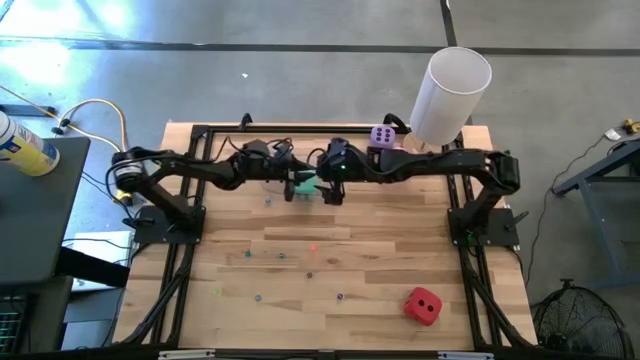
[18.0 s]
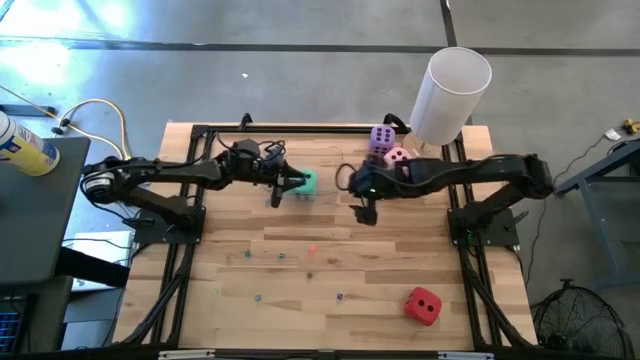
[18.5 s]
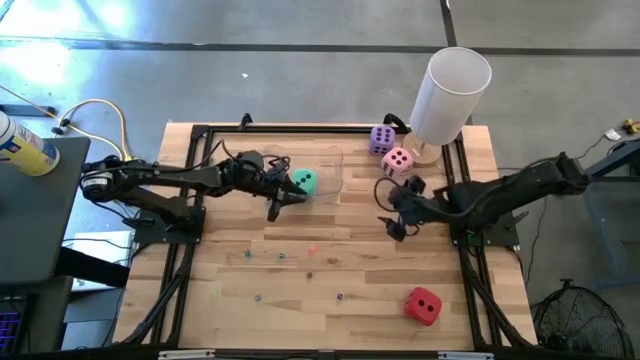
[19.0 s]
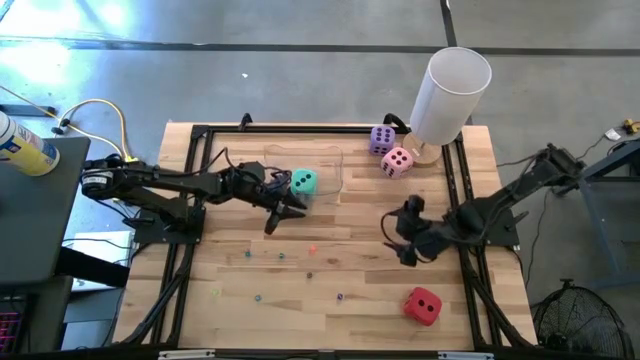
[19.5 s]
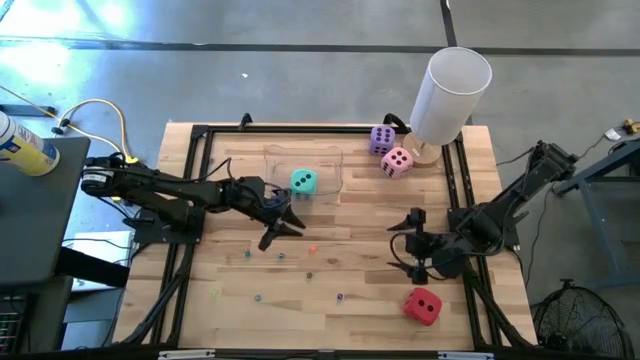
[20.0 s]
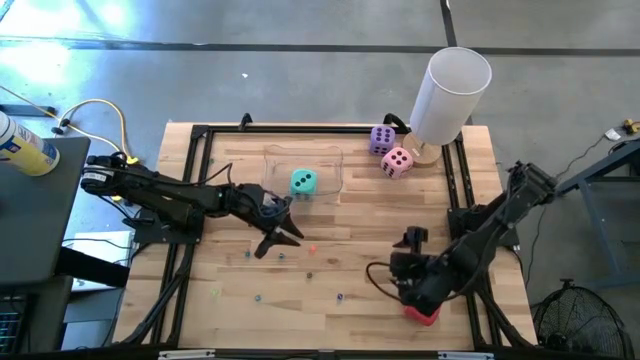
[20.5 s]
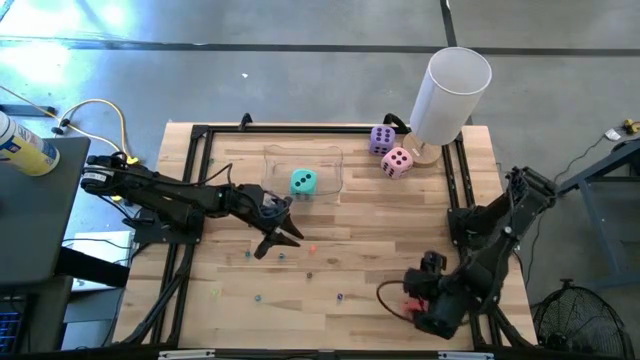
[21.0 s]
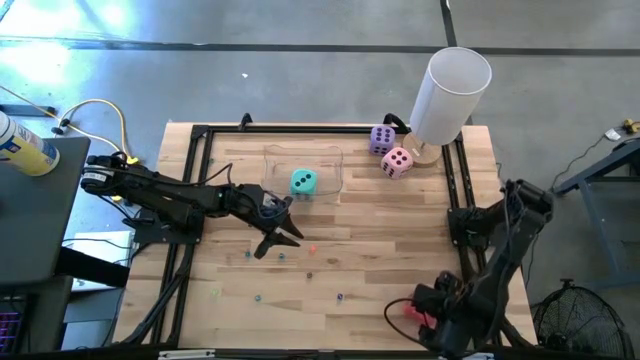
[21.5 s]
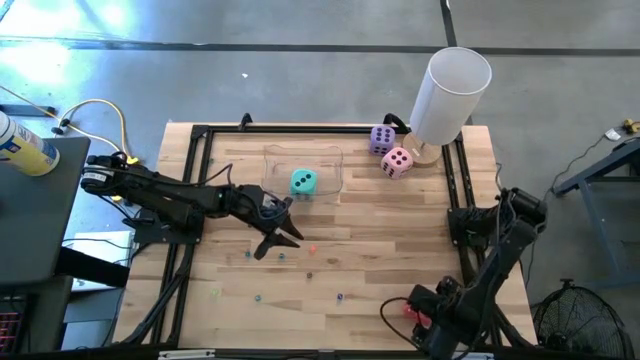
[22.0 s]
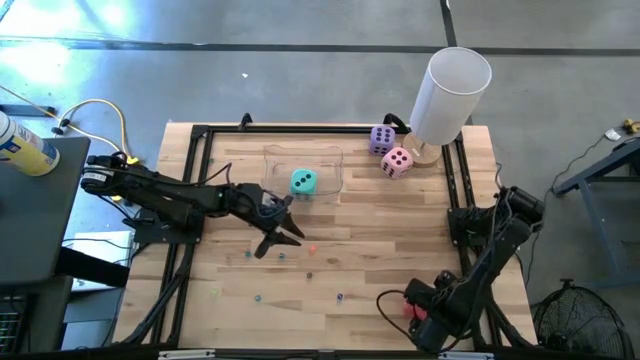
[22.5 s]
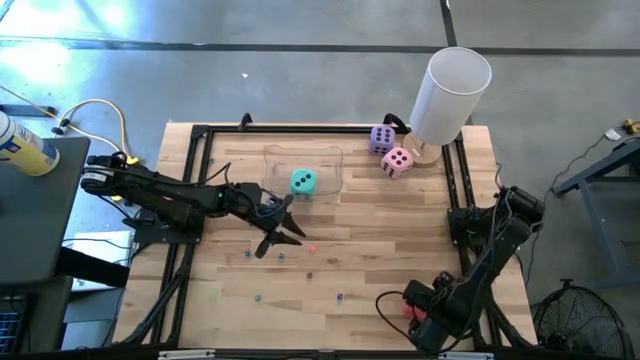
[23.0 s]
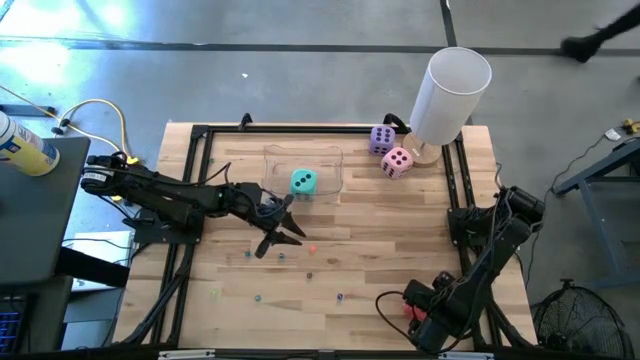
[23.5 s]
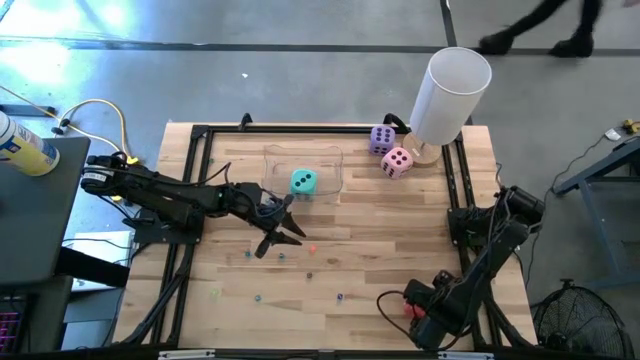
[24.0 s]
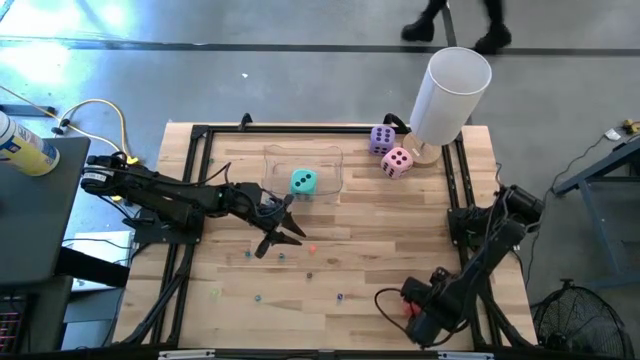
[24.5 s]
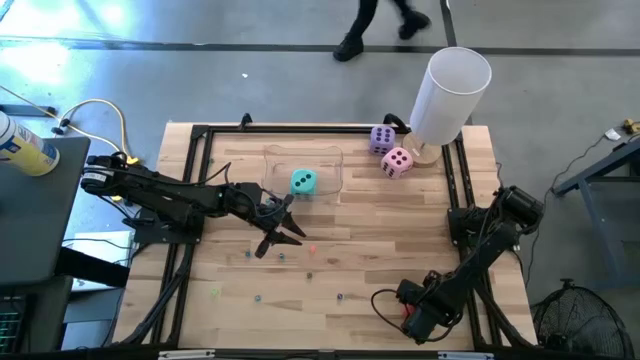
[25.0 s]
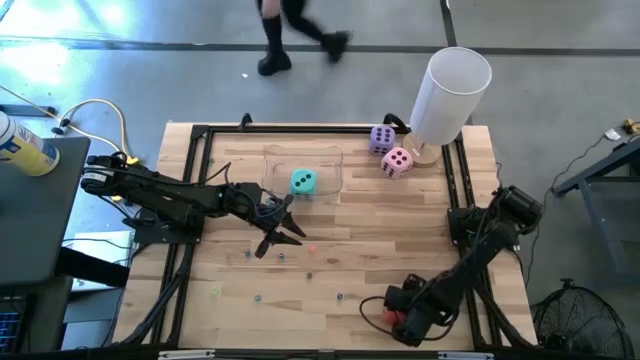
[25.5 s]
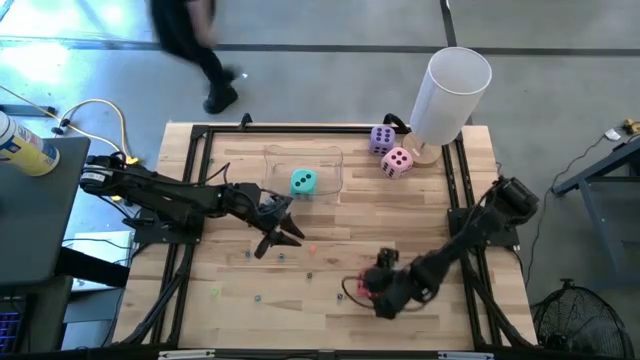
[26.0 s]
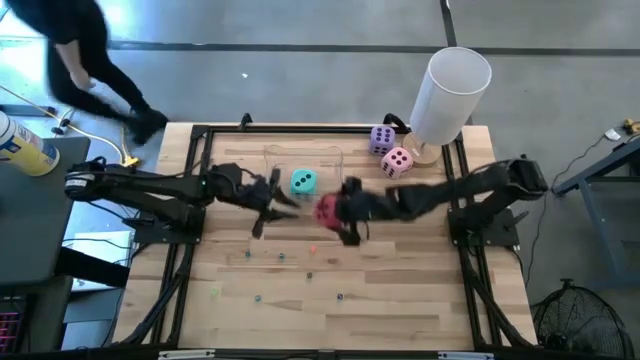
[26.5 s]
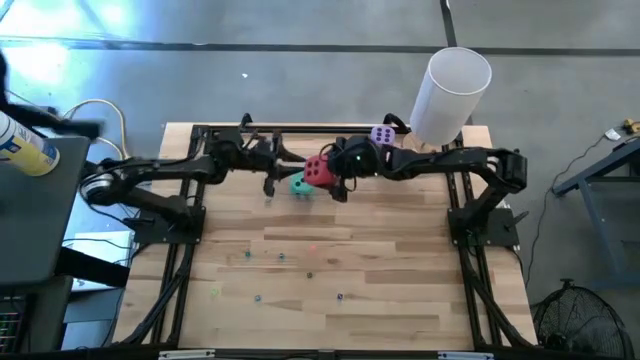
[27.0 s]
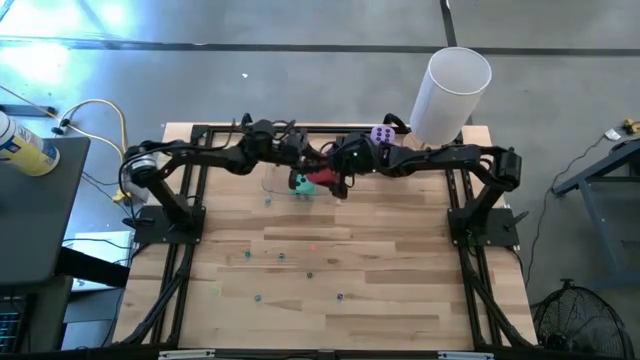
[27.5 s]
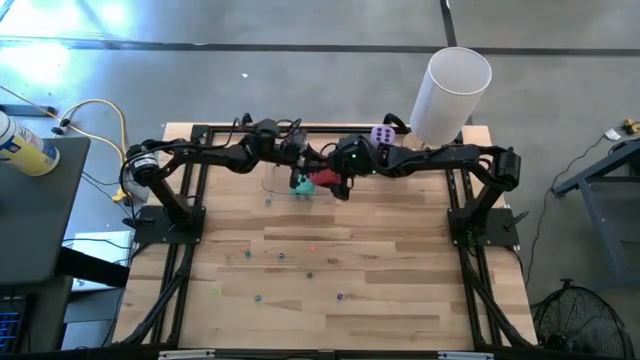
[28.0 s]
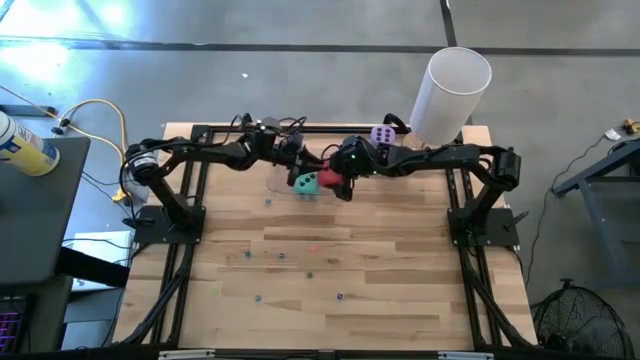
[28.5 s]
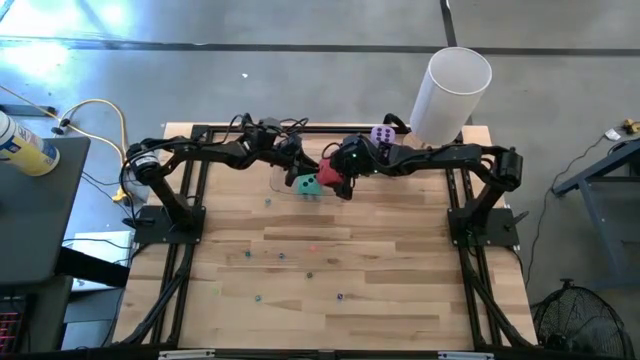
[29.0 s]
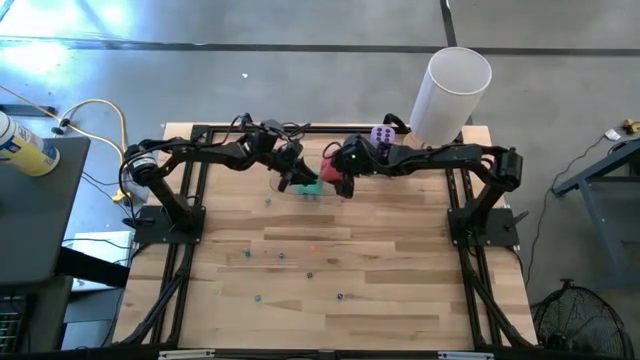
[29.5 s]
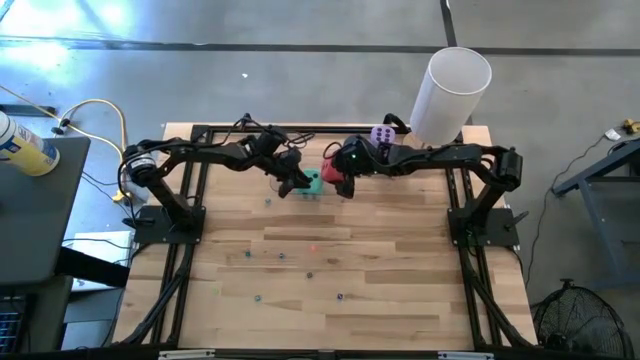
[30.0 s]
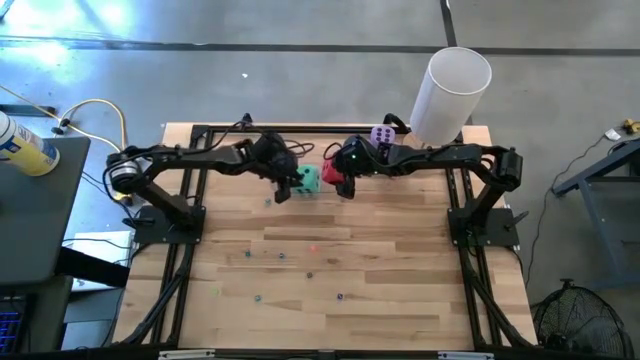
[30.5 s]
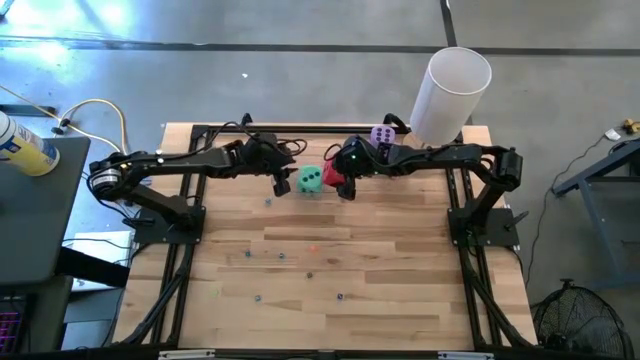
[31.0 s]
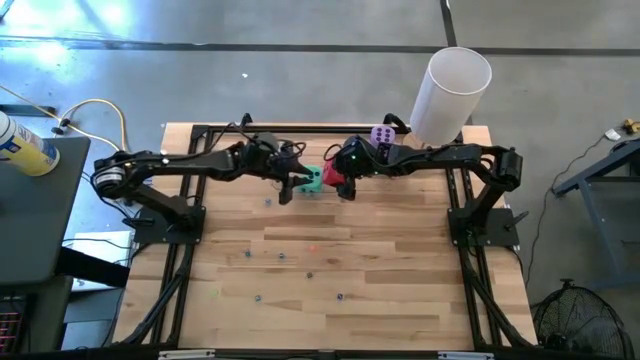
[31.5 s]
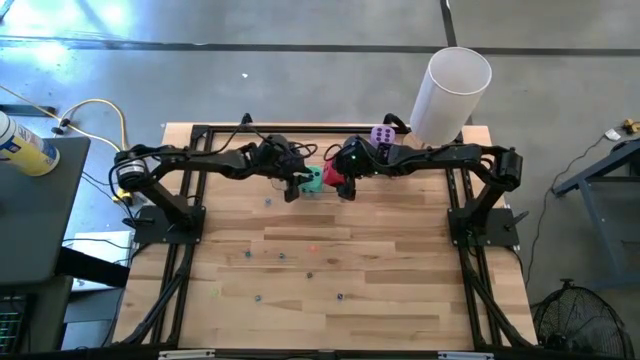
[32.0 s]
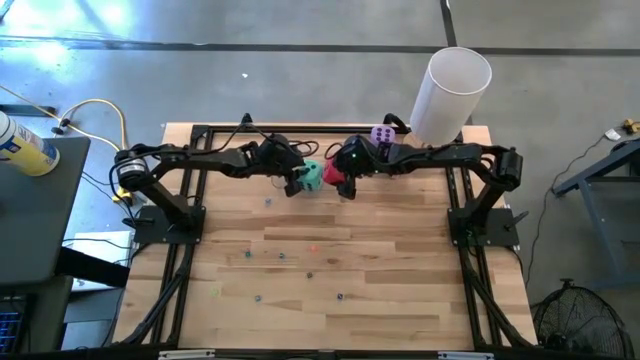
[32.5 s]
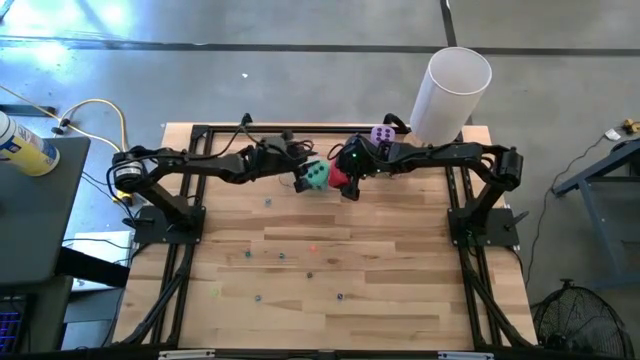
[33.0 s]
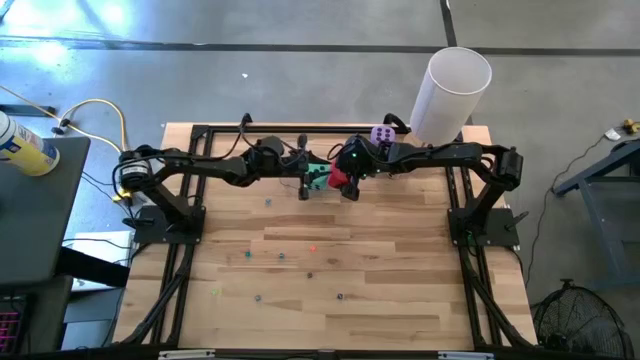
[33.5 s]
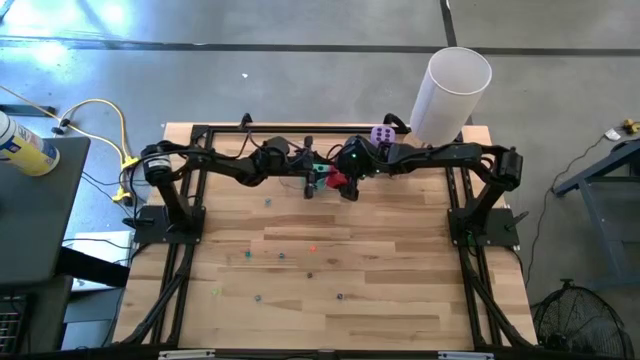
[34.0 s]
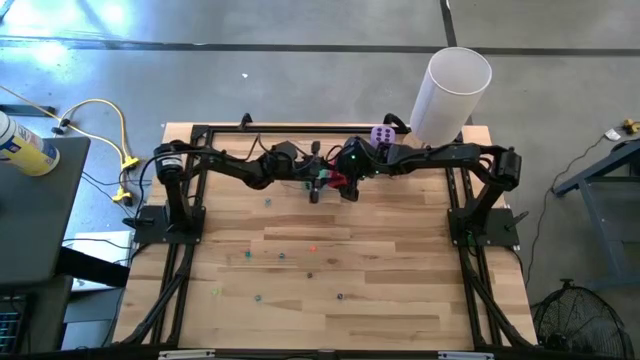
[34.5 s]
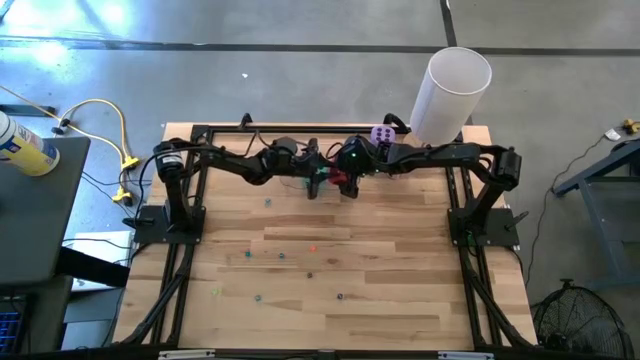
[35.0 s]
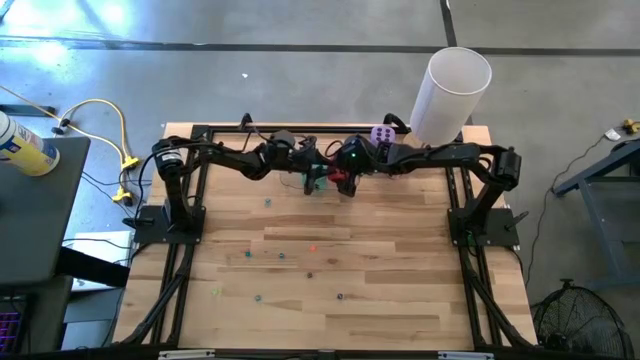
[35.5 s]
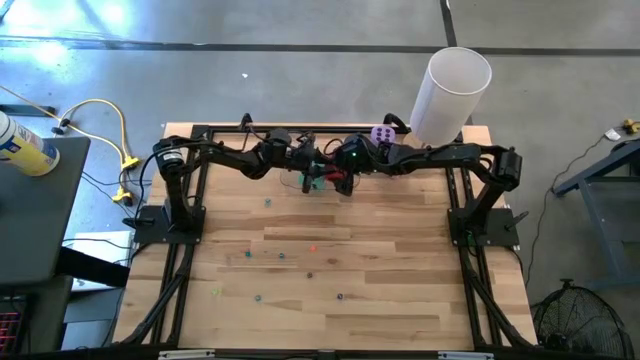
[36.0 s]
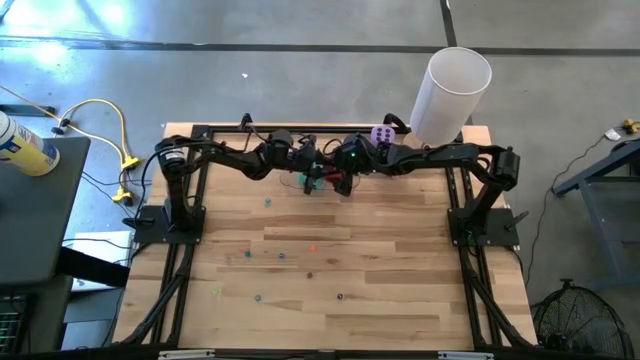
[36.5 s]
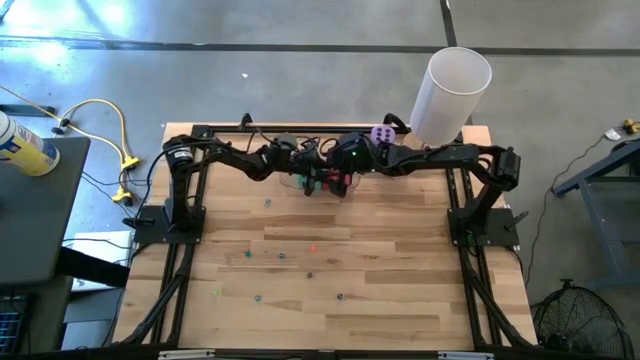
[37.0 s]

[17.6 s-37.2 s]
Task: Pick & Place Dice
Put the large red dice into the transparent bin
